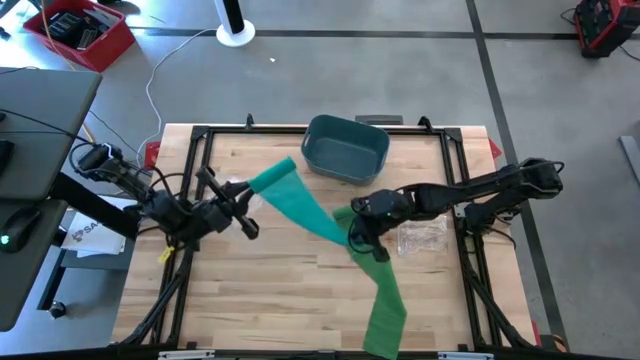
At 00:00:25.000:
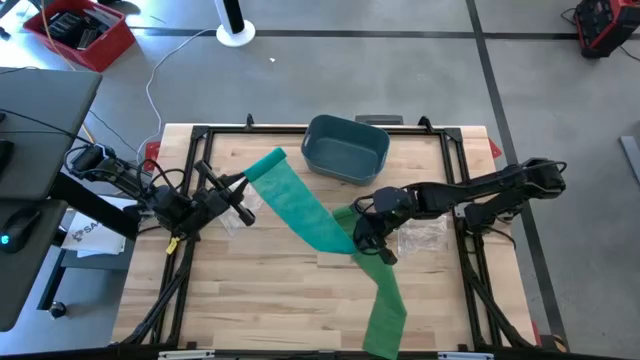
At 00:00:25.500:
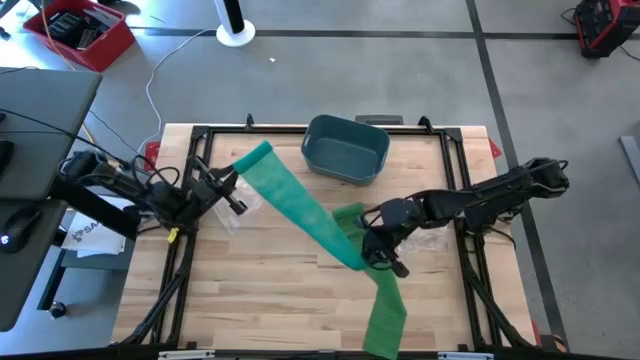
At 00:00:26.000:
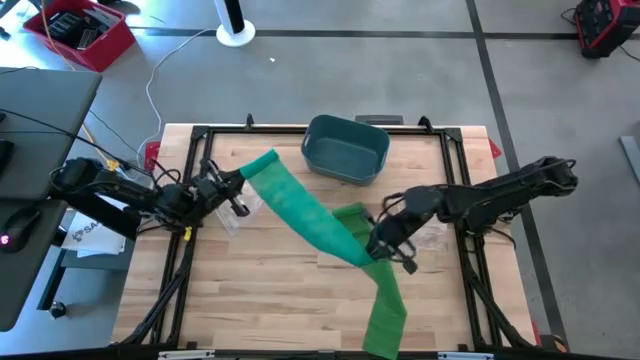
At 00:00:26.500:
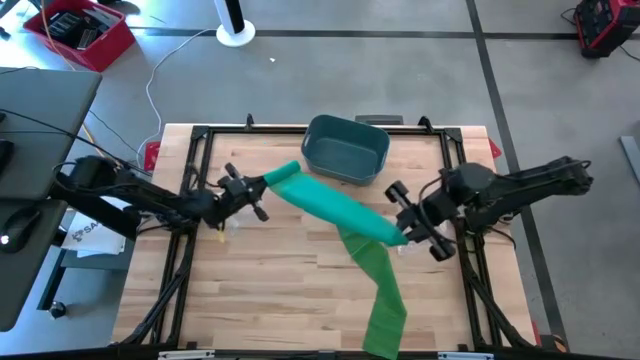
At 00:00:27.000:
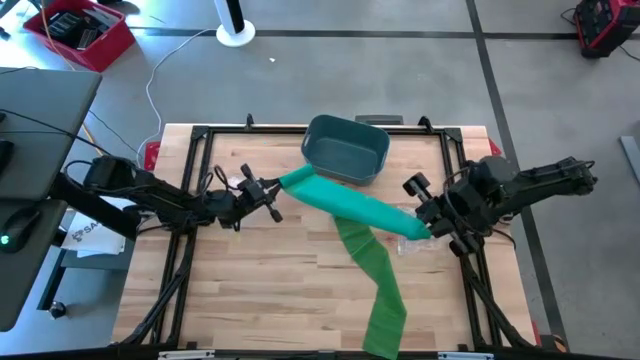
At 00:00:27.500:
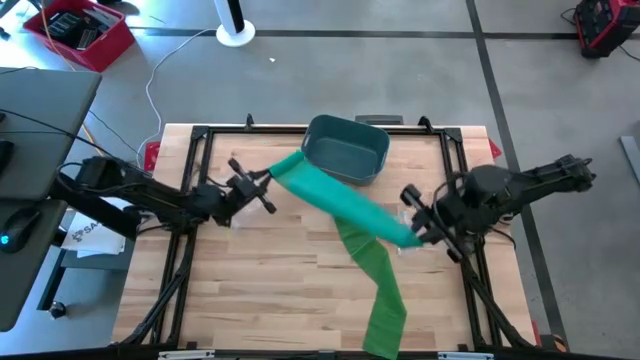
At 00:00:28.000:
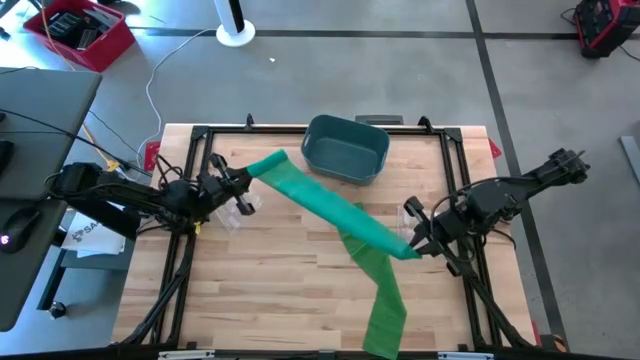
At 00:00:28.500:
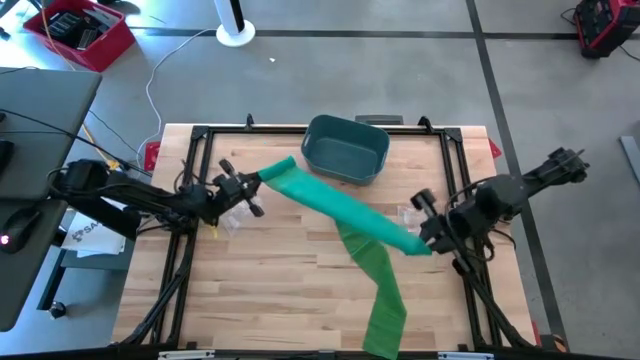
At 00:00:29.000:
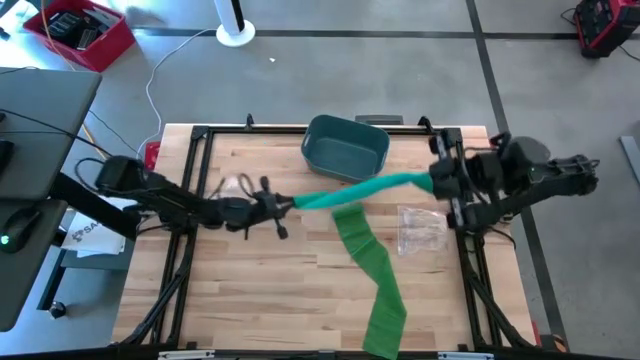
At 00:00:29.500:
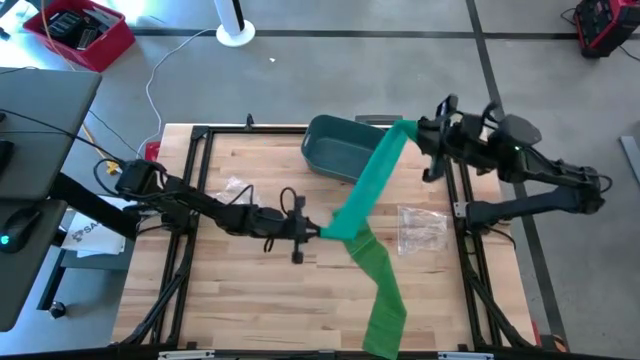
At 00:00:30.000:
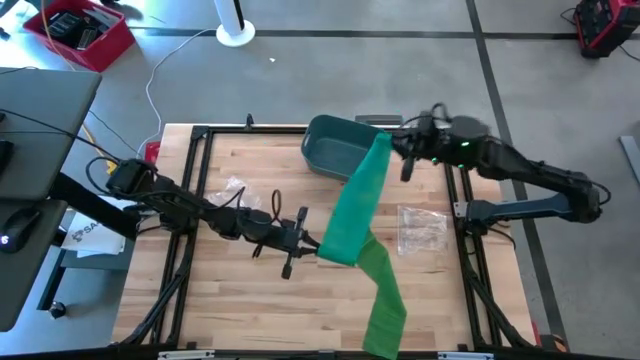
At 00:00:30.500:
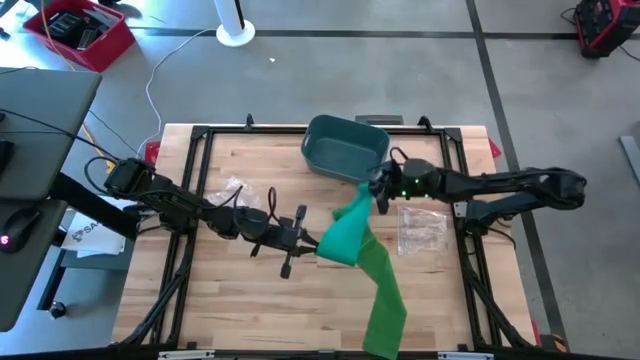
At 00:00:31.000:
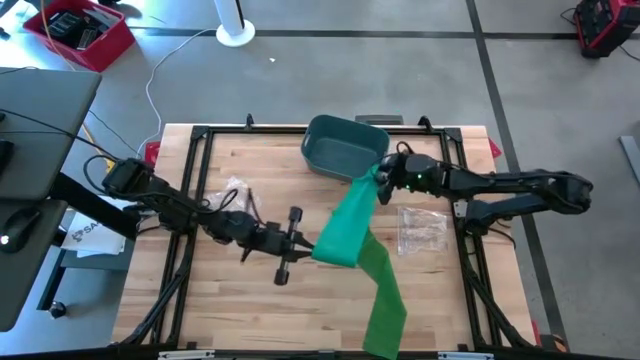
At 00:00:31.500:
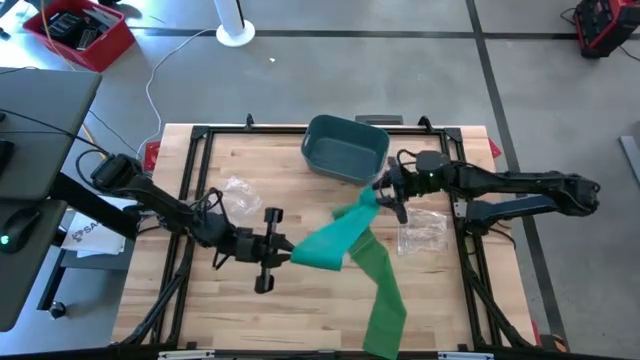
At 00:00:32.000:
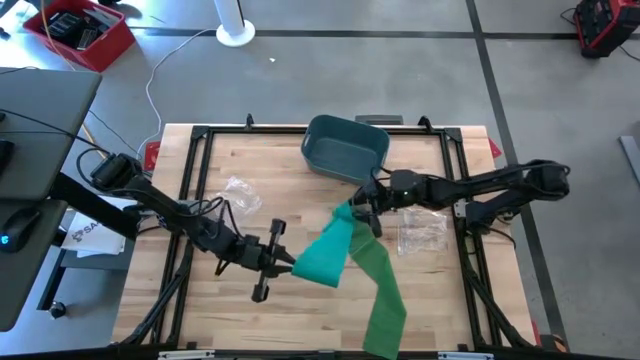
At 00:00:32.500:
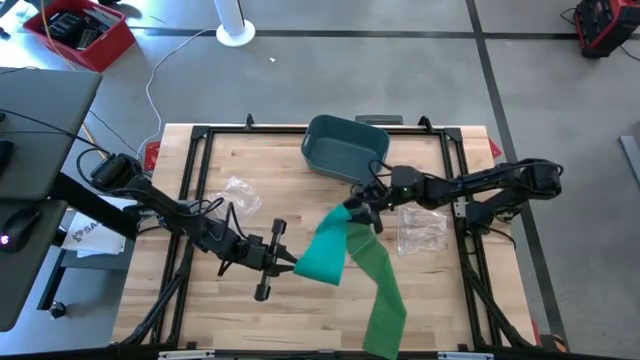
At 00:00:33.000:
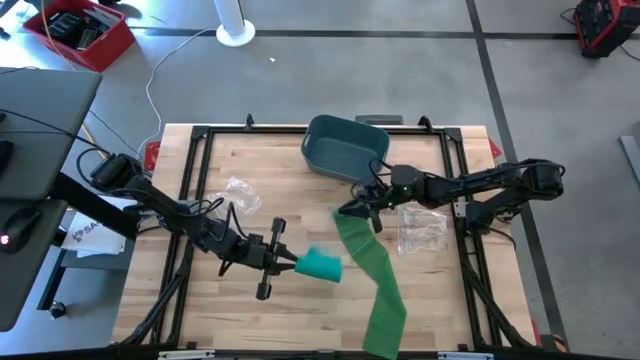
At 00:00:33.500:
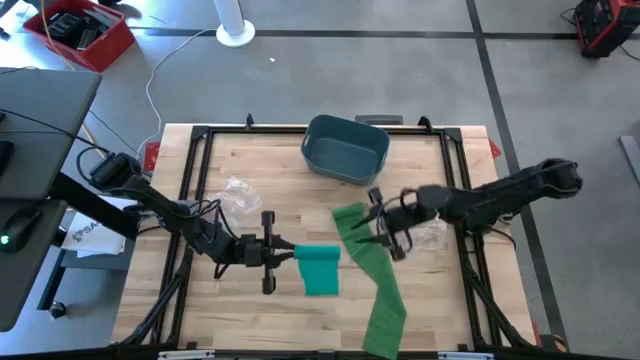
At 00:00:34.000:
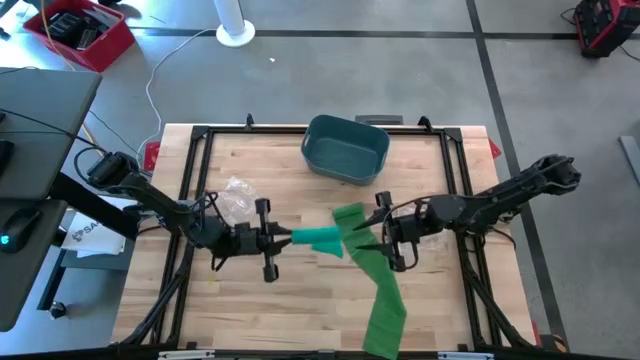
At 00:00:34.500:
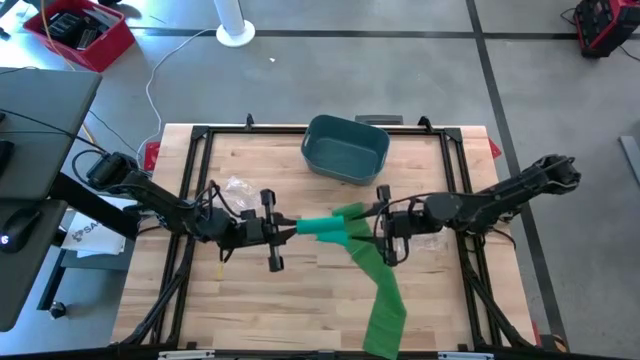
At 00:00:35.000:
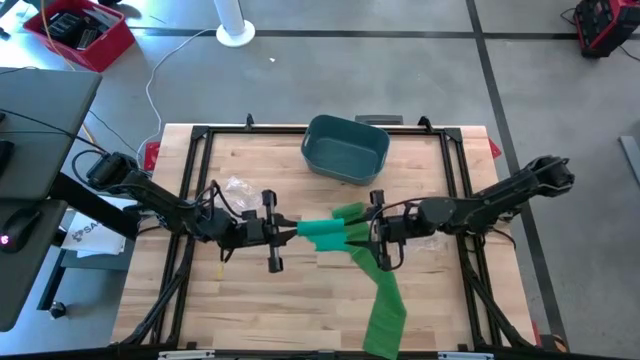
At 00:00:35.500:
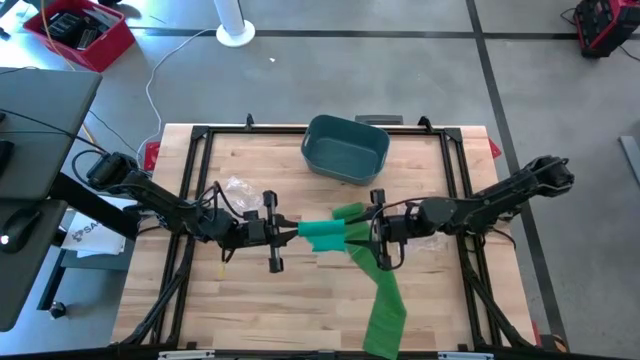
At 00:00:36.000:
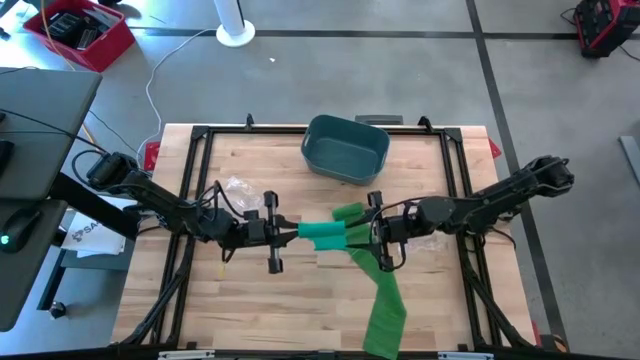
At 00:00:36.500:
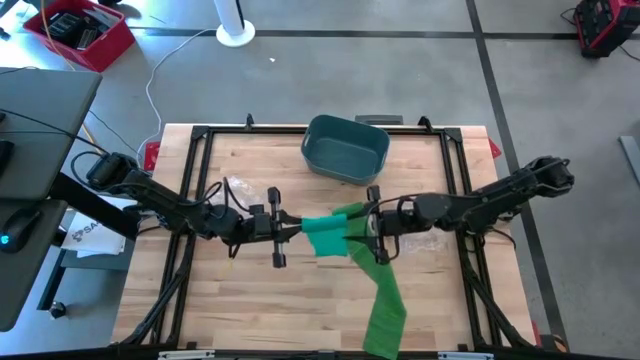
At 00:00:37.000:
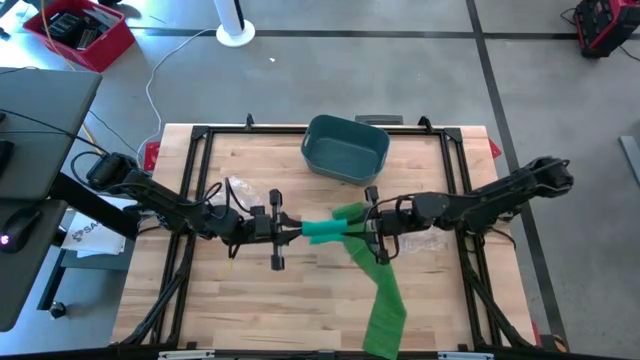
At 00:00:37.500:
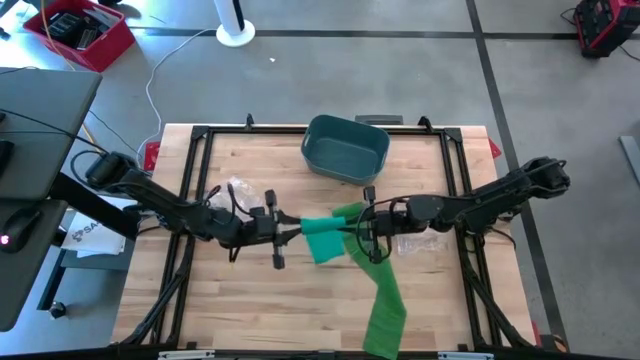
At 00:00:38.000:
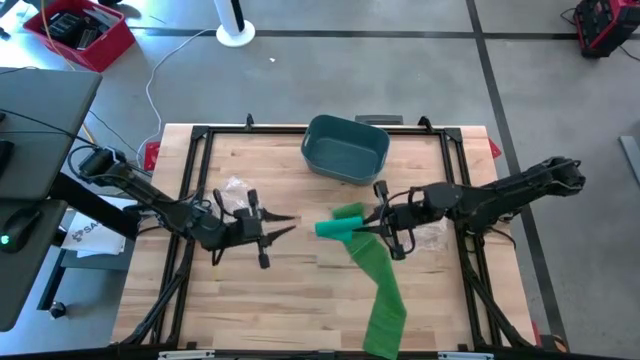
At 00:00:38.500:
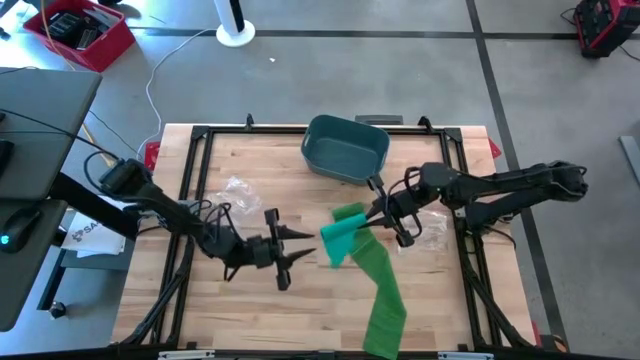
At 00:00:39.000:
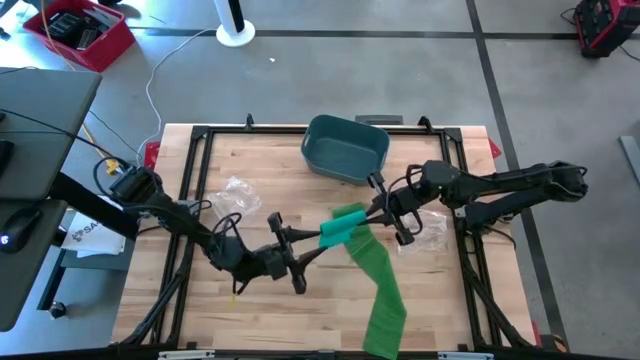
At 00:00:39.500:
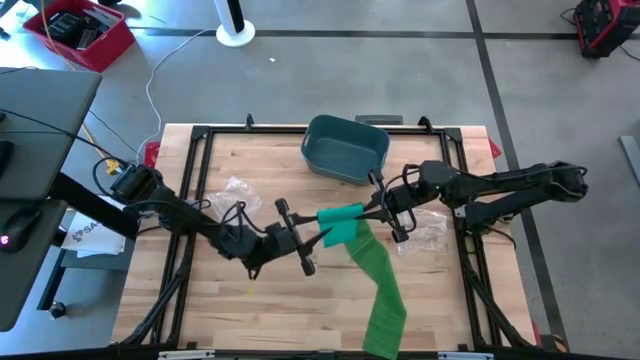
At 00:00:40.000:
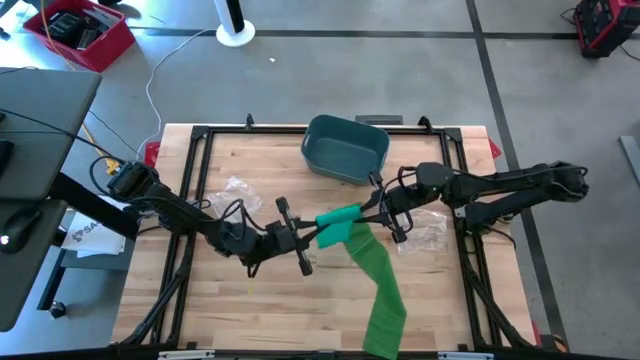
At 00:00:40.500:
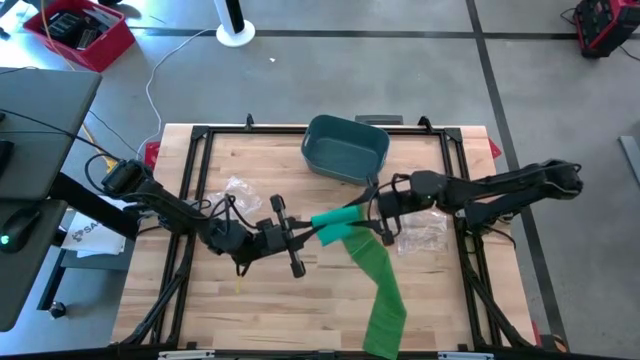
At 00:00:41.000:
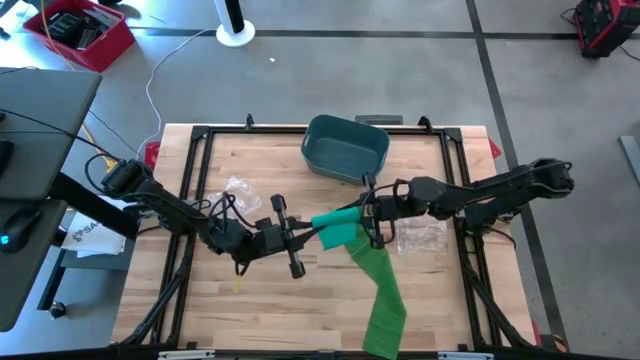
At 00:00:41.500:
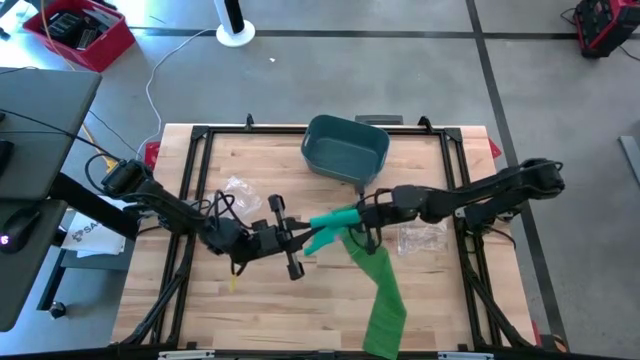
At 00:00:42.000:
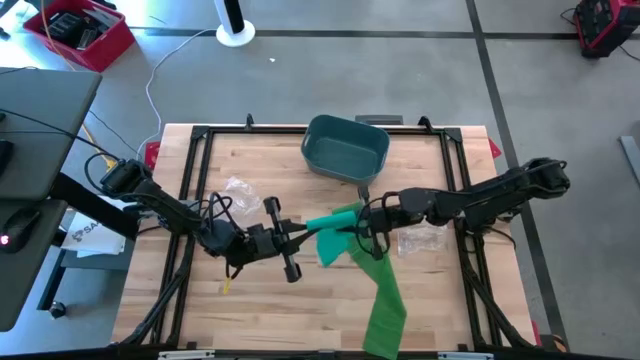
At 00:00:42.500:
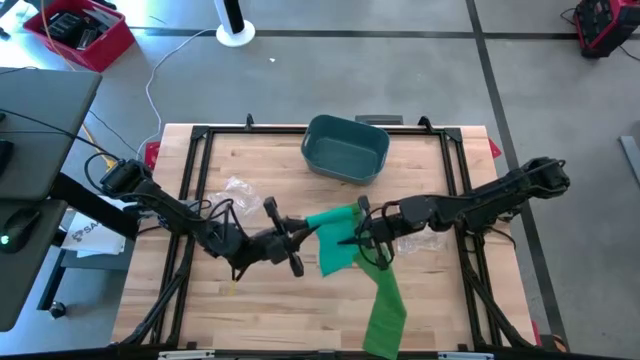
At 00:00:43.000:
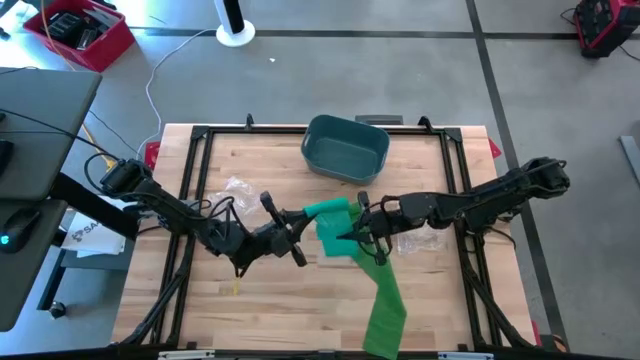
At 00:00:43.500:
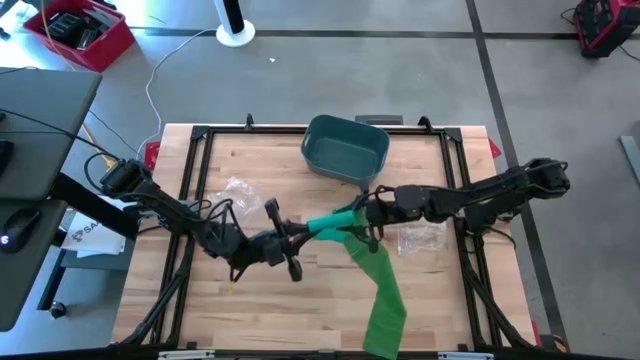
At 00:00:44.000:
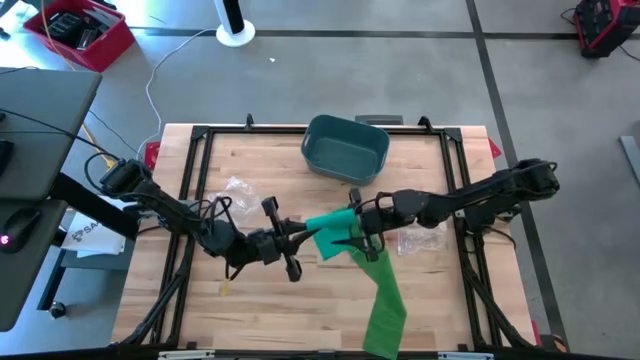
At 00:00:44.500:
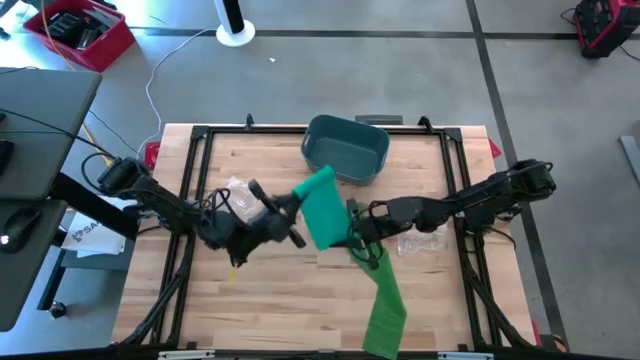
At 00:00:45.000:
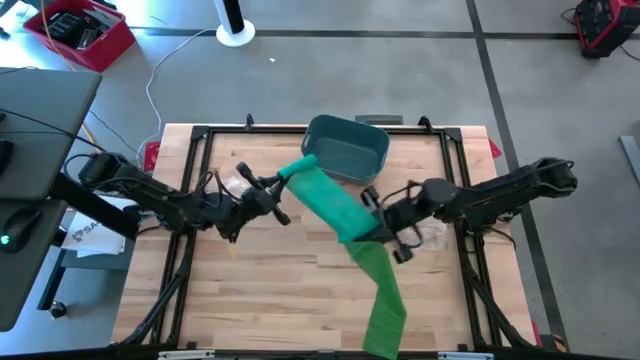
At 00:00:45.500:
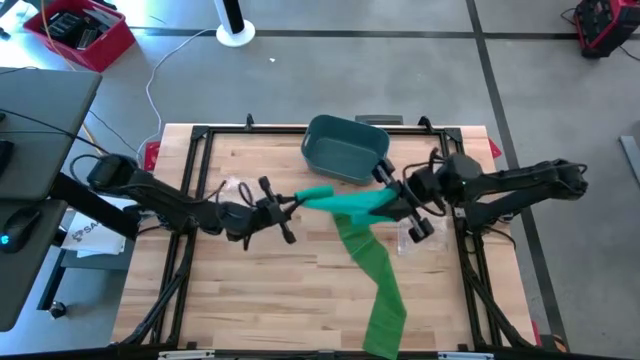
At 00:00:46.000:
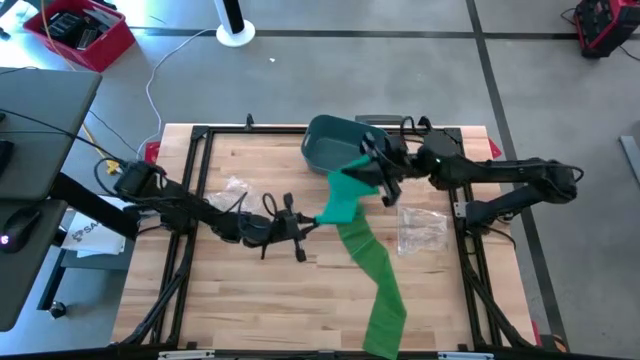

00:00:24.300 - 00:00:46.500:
Task: Roll bandage
Roll the light green bandage
